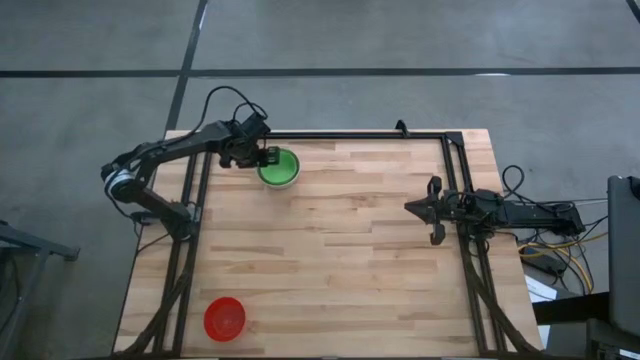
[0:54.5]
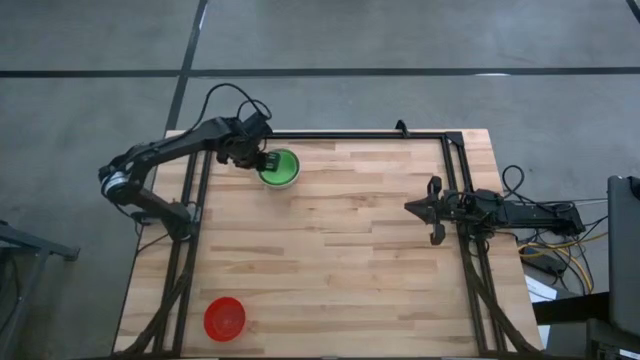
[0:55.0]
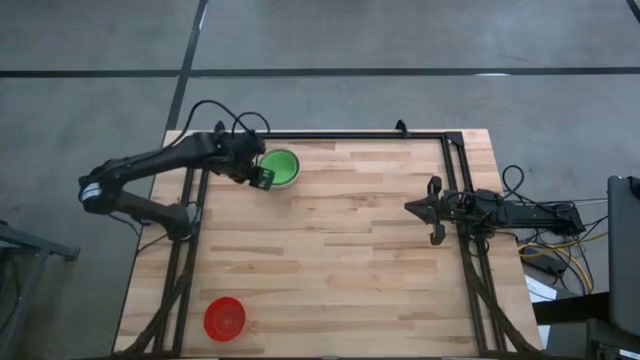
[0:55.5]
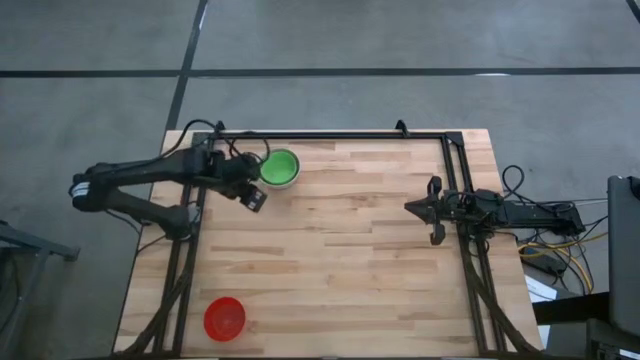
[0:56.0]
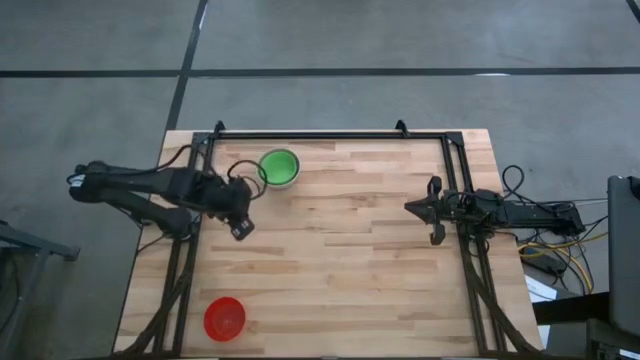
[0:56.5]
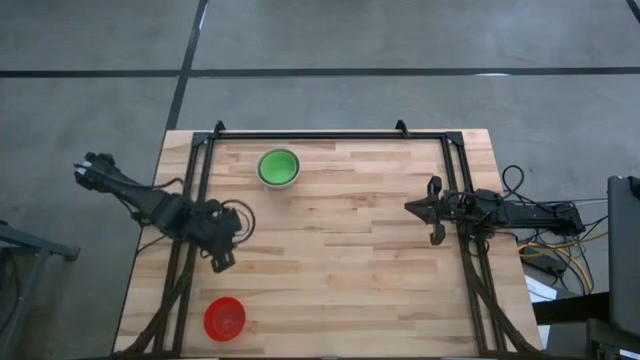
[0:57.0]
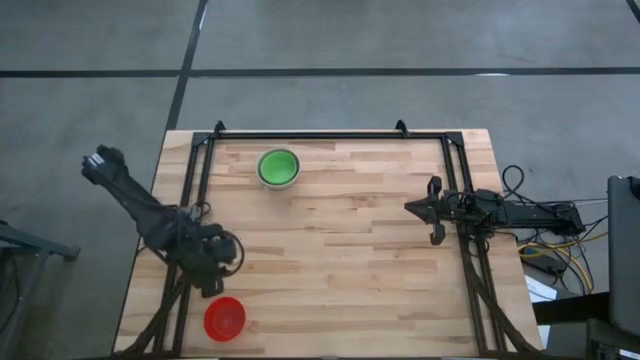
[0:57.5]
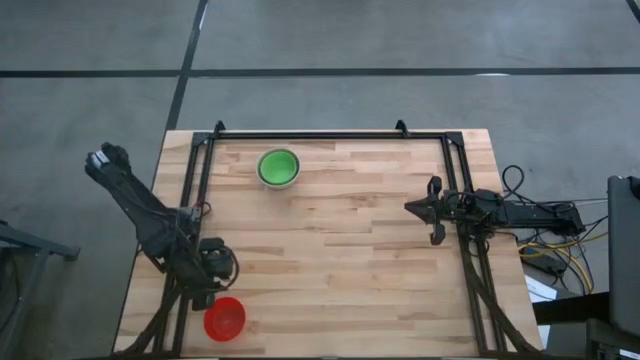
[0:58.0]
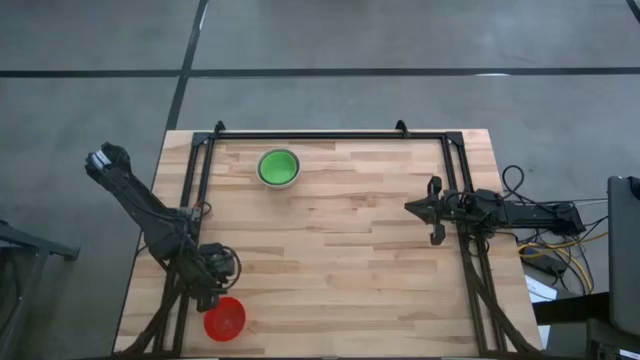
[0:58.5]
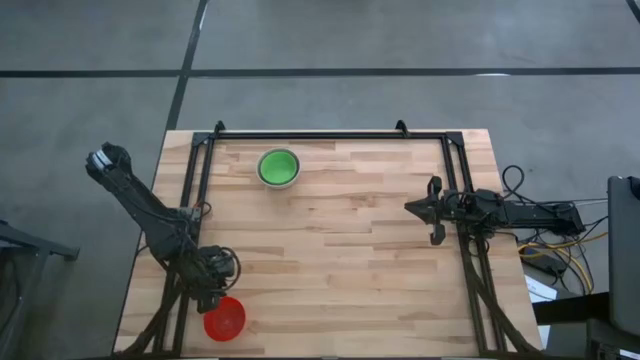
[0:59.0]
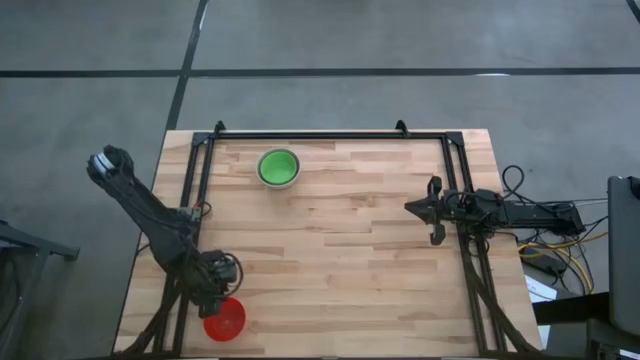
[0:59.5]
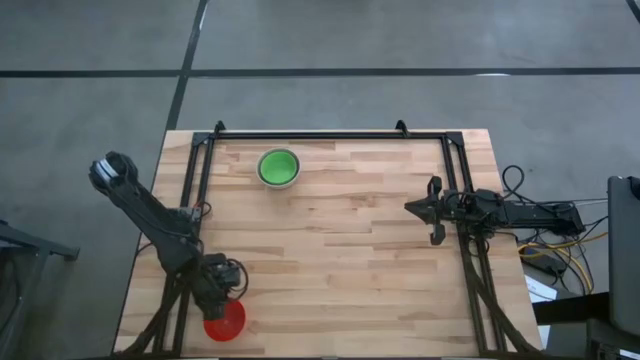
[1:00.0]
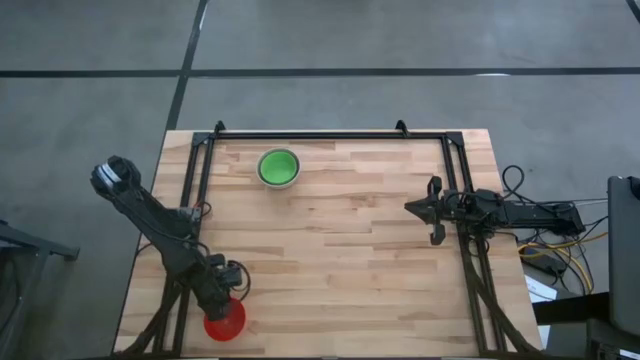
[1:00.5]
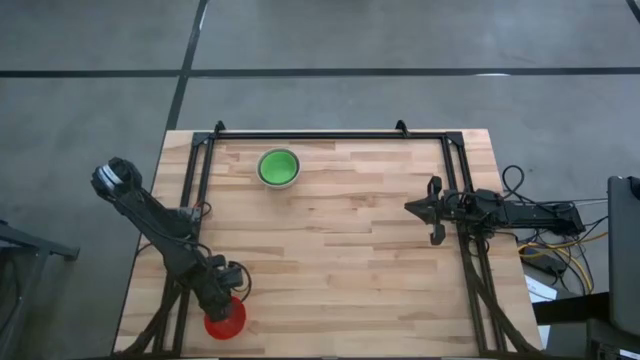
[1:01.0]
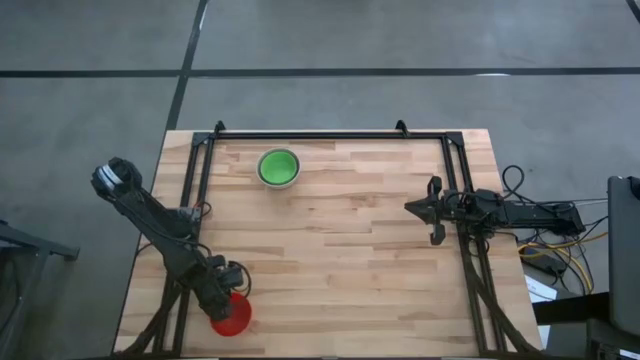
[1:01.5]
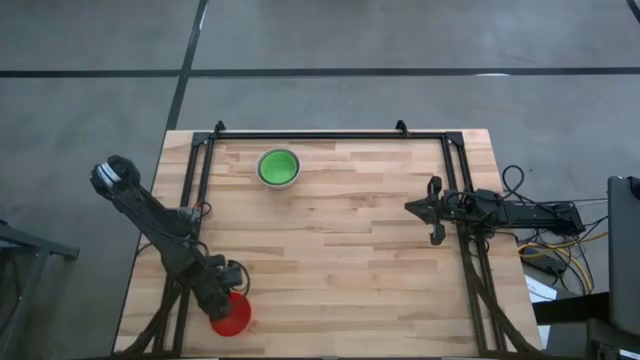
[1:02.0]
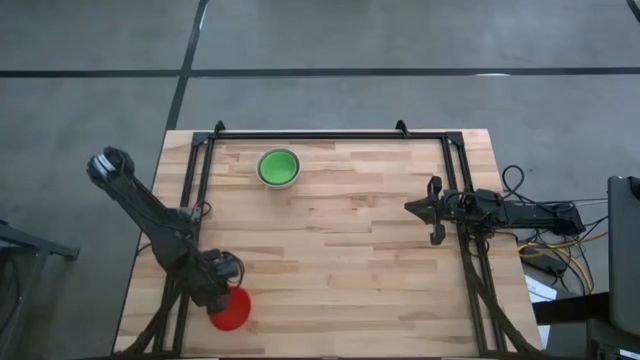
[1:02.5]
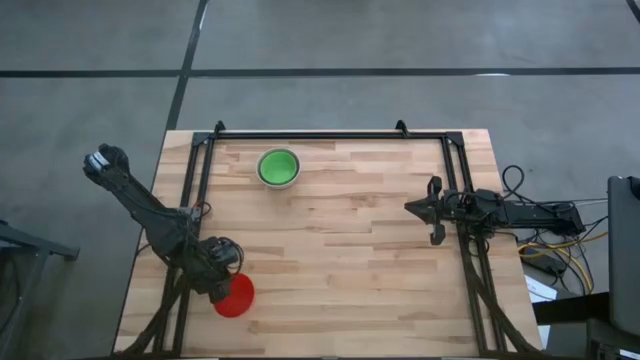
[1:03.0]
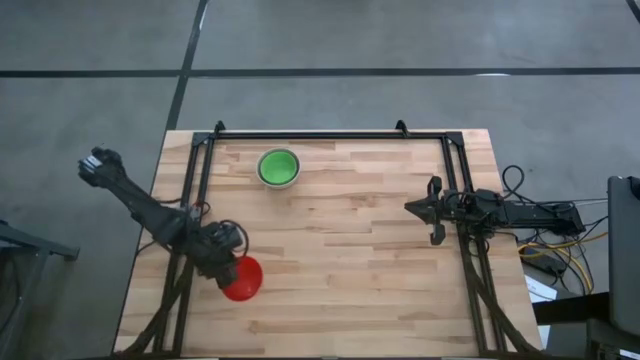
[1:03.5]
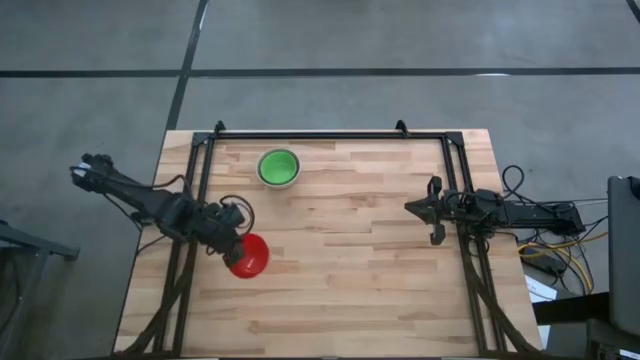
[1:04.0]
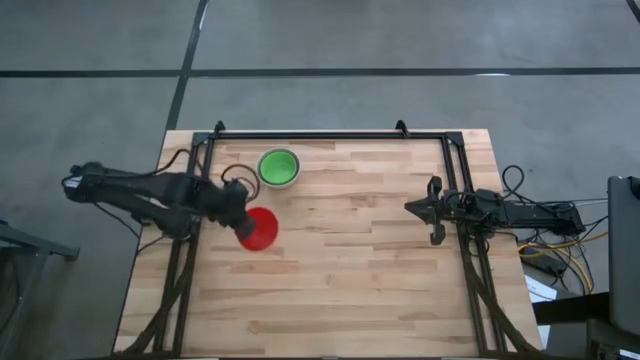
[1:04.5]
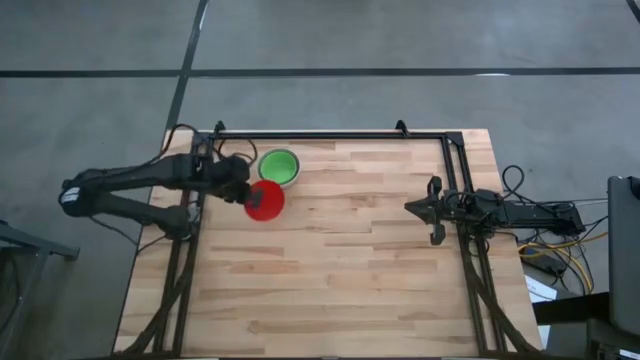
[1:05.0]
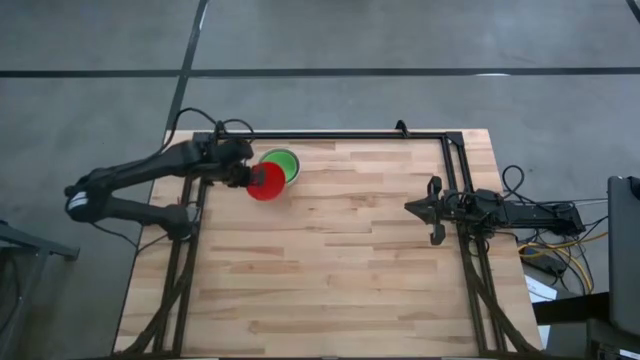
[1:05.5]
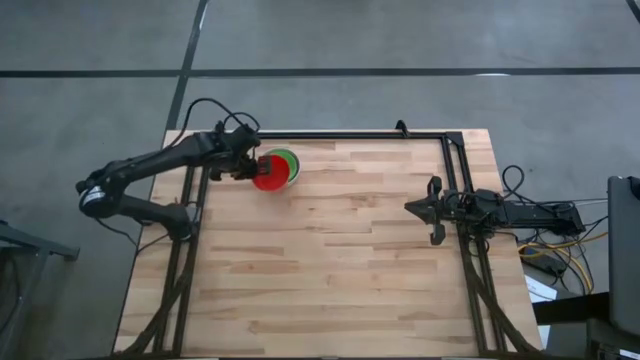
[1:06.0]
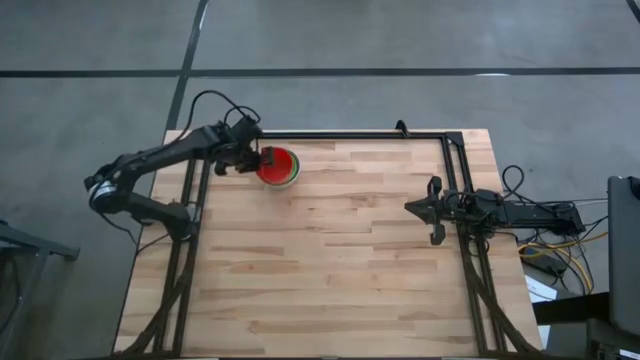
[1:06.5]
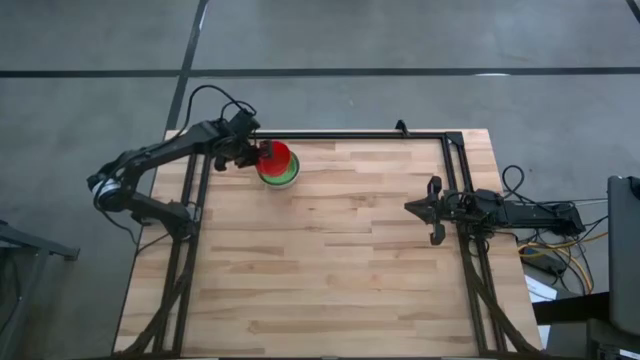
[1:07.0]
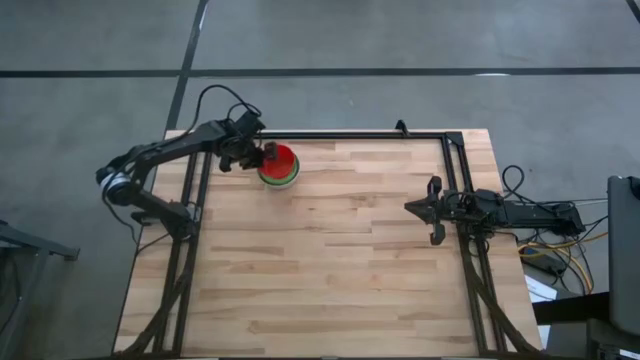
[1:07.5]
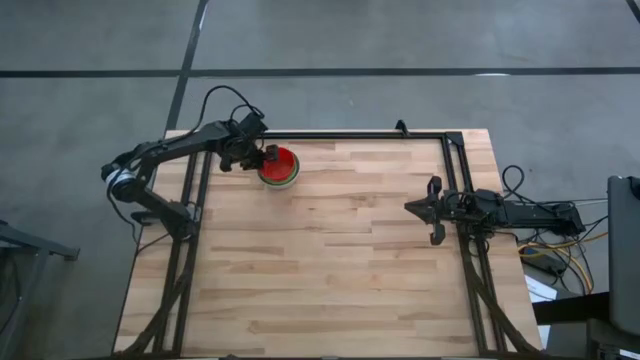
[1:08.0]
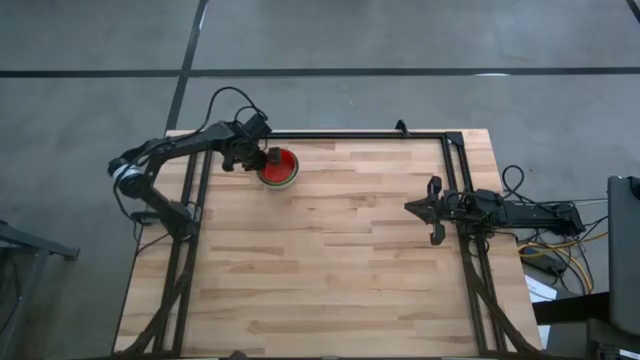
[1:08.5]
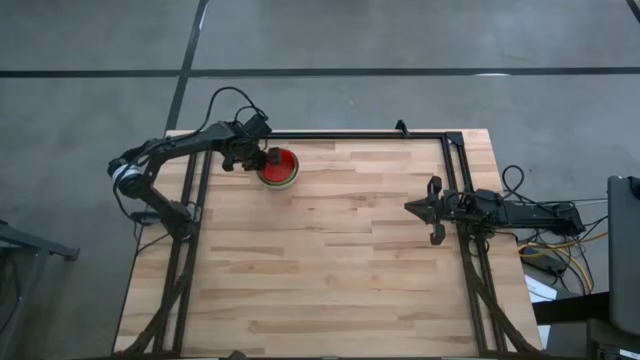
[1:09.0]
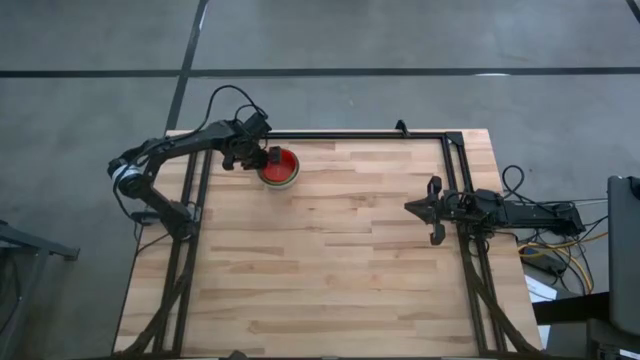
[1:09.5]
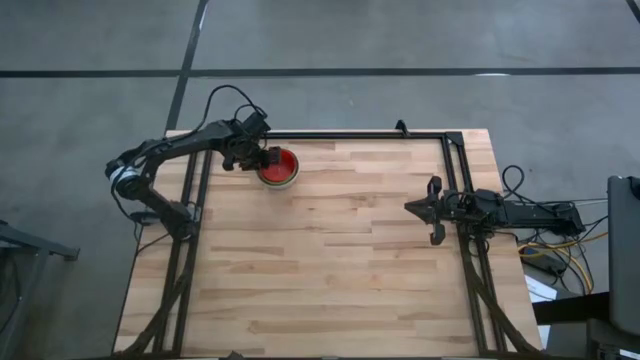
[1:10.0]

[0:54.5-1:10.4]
Stack the orange bowl on the green bowl
